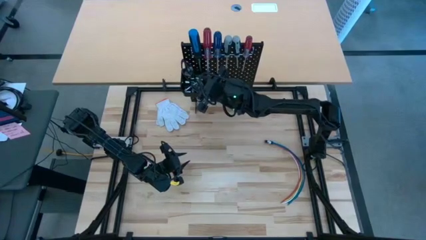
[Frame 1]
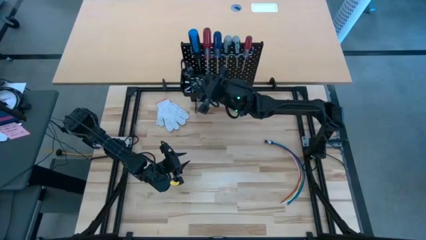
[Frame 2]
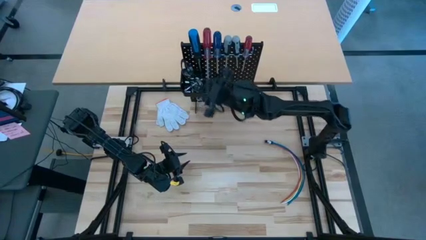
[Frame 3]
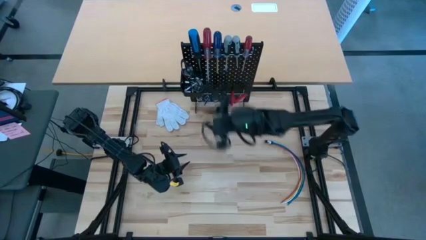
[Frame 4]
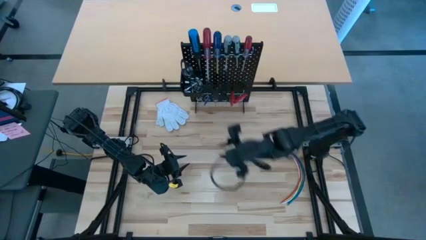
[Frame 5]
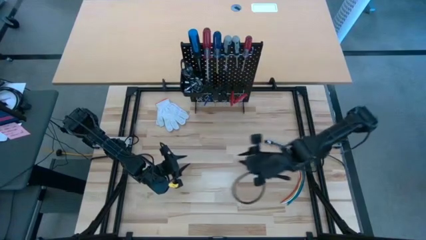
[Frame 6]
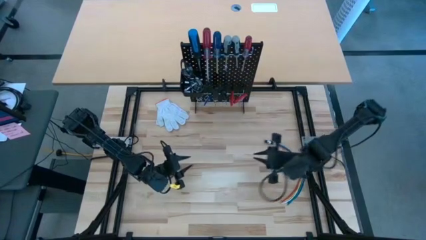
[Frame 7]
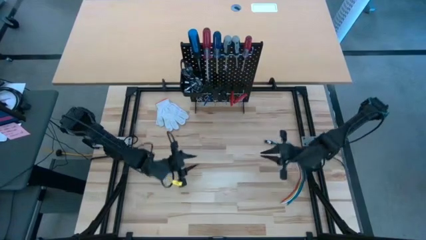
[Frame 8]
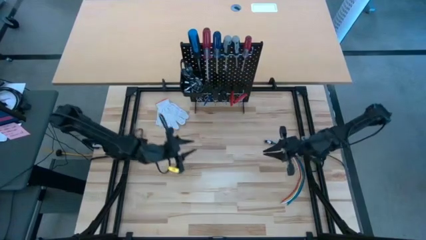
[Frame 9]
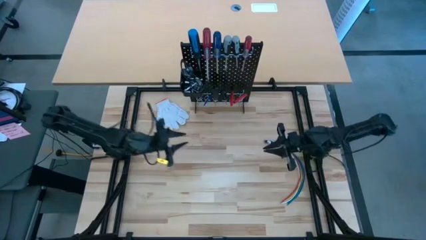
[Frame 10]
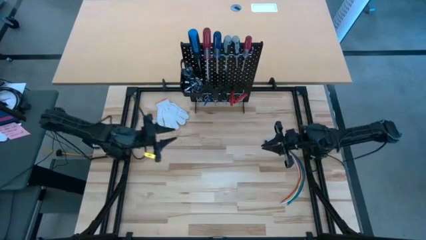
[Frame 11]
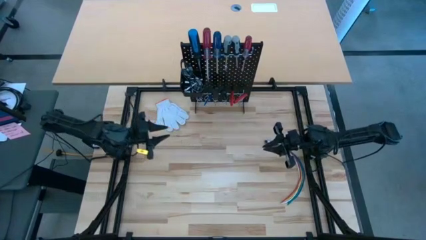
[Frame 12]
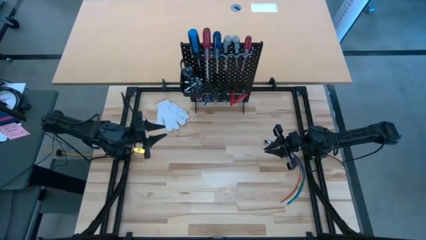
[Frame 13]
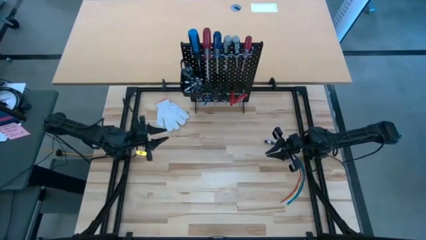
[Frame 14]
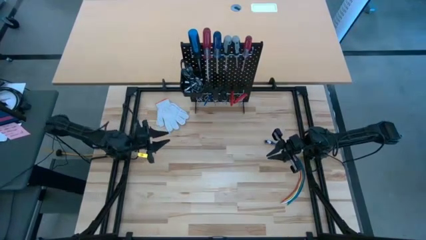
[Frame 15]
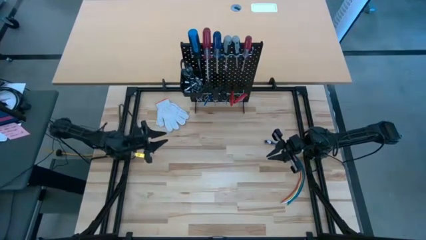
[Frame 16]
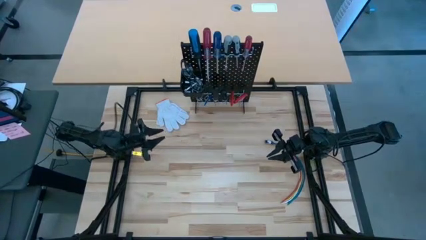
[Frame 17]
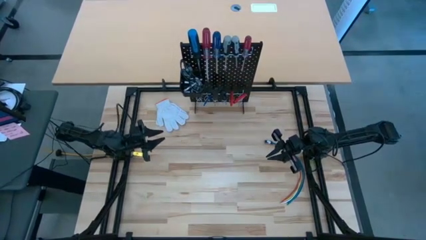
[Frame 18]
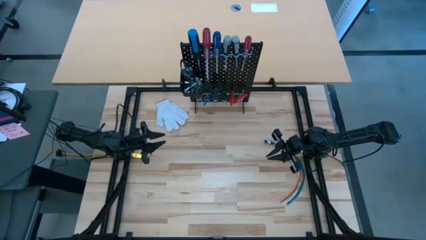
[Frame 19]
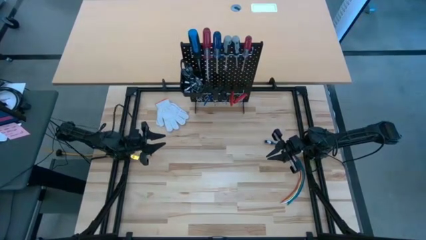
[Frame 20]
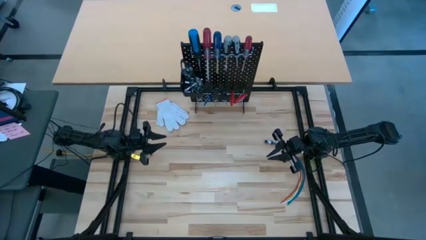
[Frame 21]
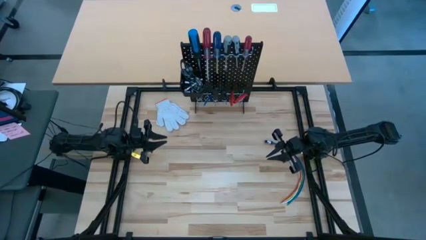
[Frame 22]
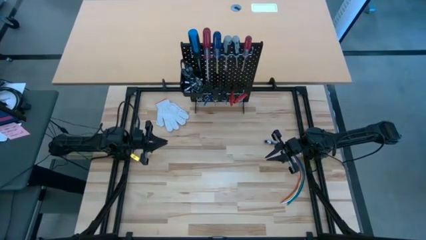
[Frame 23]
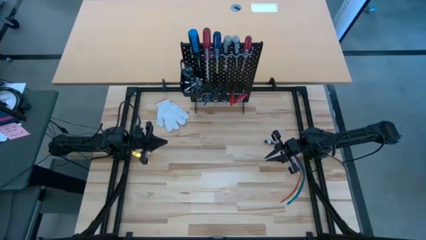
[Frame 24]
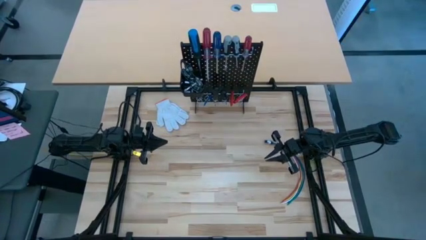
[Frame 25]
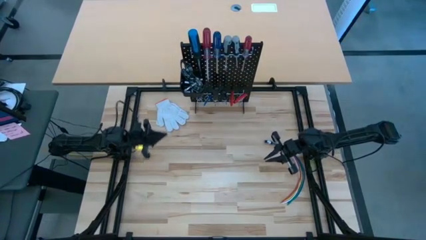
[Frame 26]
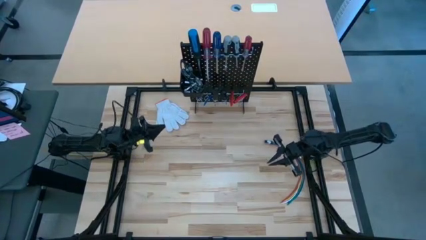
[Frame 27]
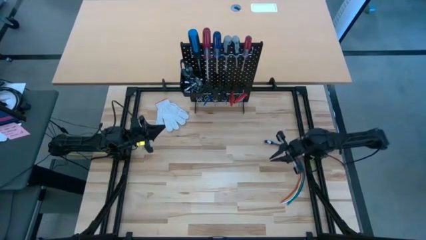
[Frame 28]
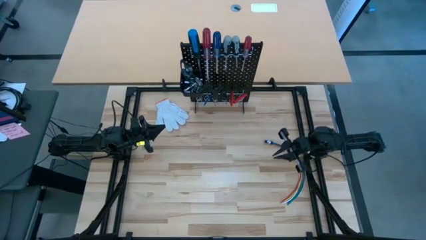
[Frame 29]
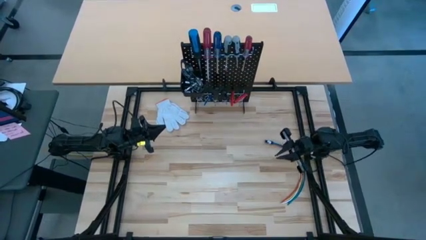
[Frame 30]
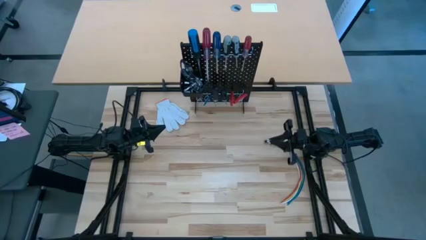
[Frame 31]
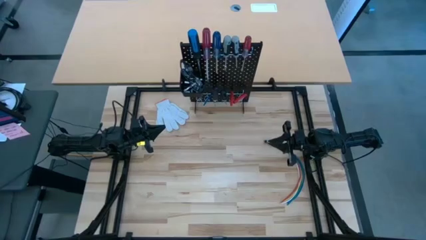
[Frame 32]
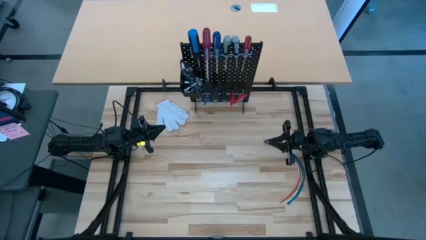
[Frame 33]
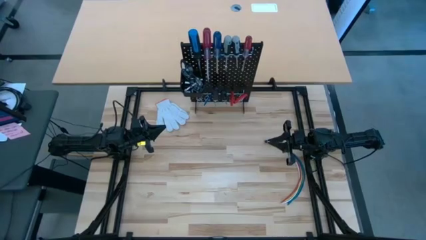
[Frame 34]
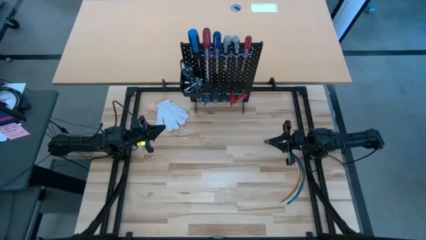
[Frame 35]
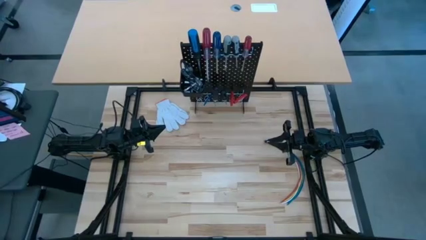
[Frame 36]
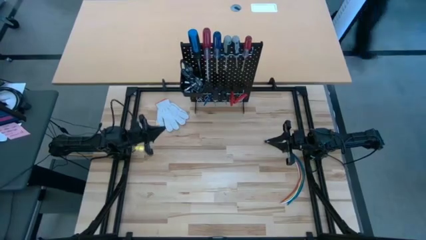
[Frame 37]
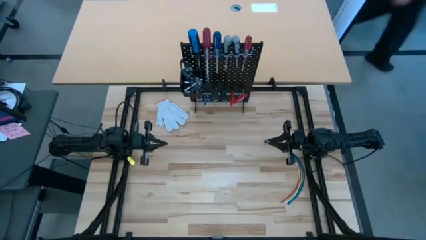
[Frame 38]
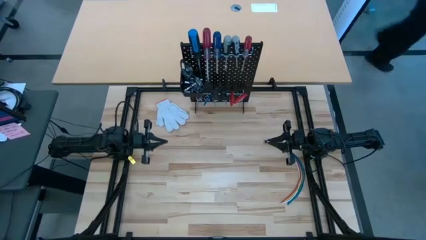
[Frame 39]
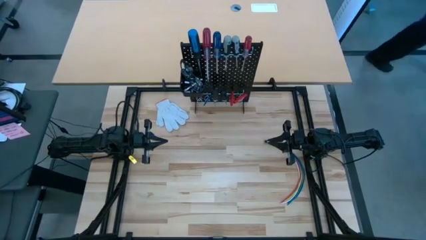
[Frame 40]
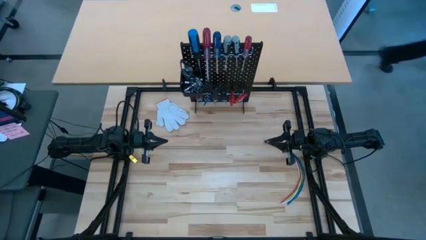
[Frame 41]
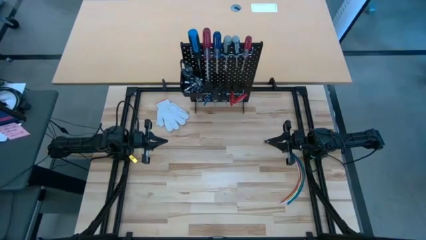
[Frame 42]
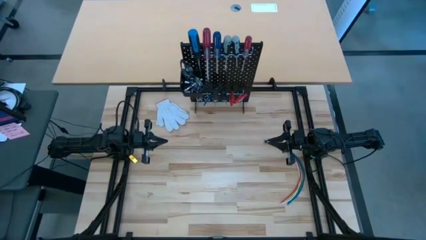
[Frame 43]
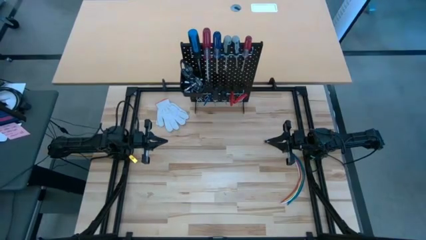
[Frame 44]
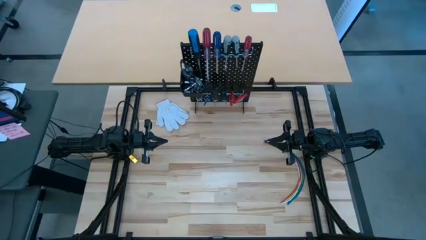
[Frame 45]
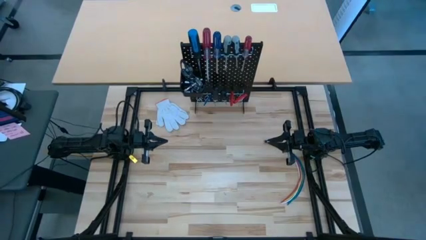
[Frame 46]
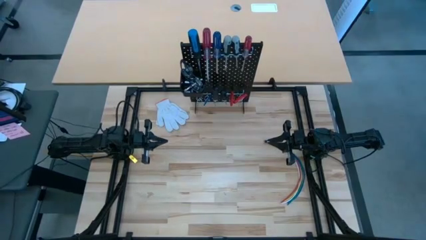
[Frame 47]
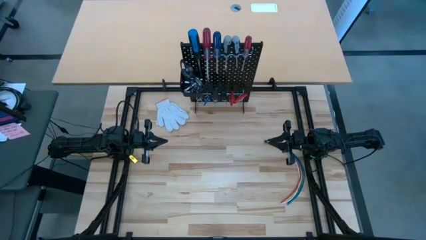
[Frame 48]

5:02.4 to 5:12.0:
Task: Hang tools onto peg board
Return to Home Position

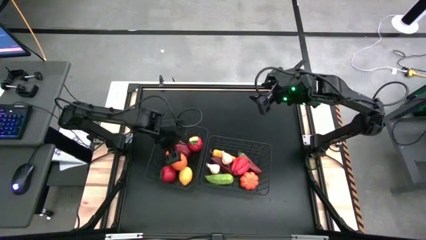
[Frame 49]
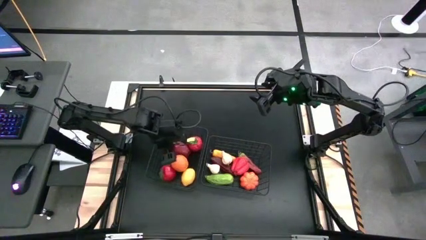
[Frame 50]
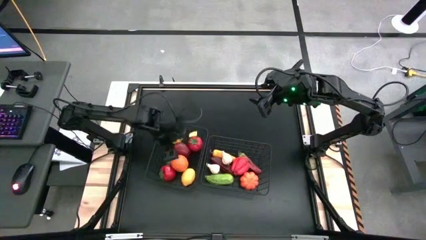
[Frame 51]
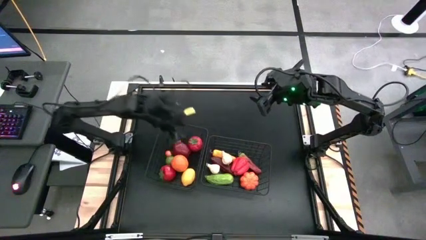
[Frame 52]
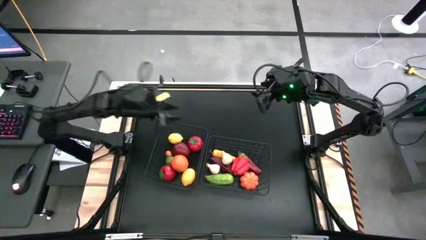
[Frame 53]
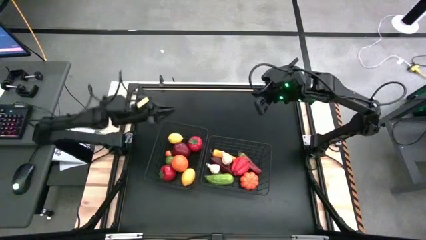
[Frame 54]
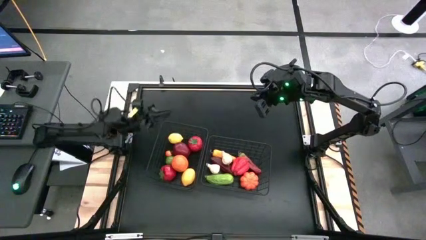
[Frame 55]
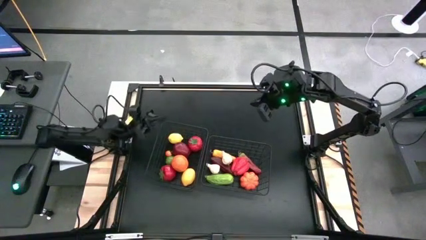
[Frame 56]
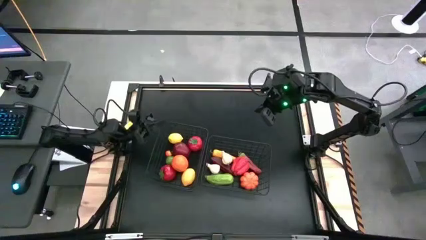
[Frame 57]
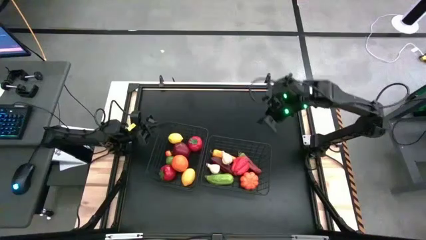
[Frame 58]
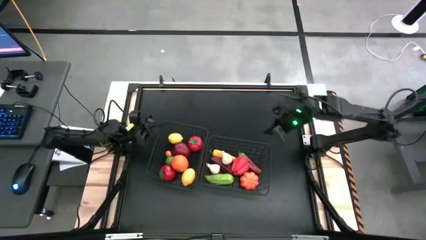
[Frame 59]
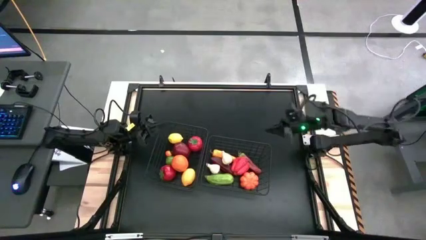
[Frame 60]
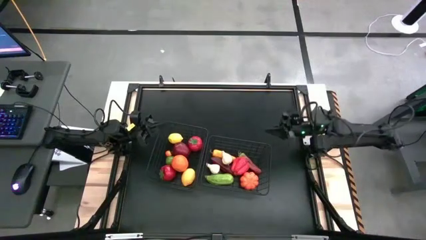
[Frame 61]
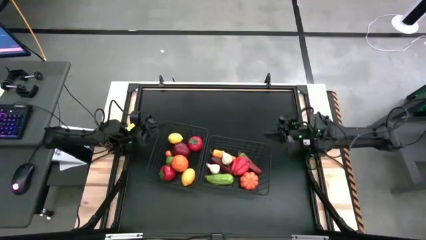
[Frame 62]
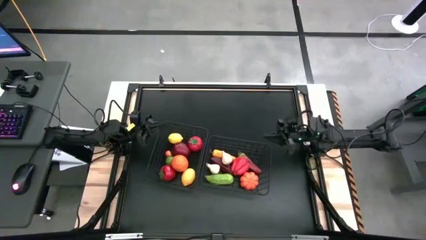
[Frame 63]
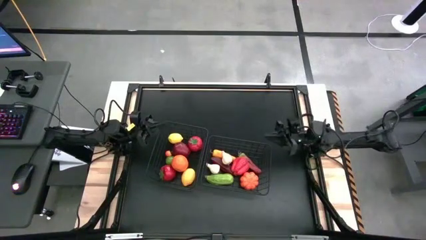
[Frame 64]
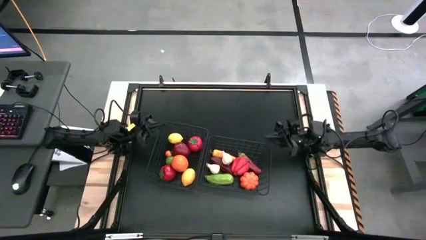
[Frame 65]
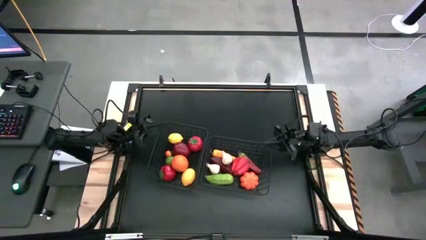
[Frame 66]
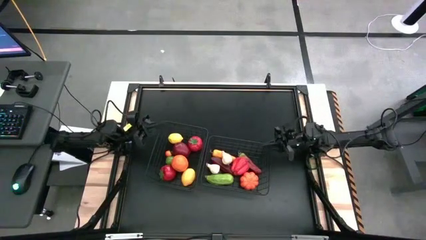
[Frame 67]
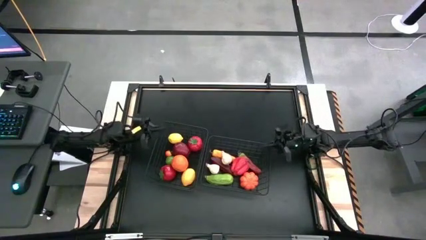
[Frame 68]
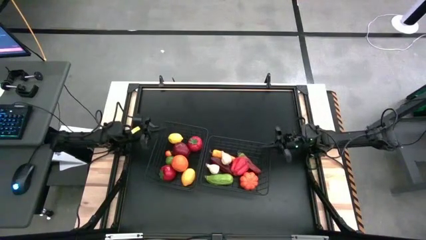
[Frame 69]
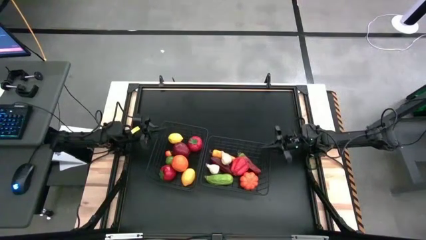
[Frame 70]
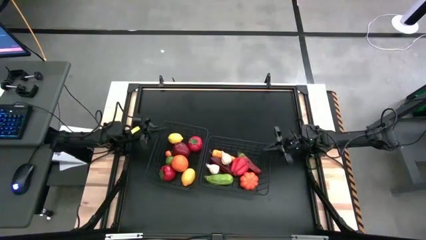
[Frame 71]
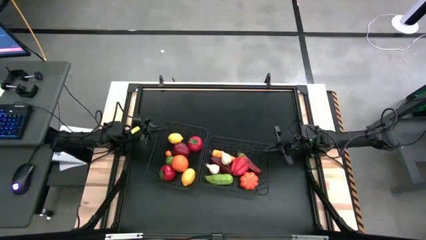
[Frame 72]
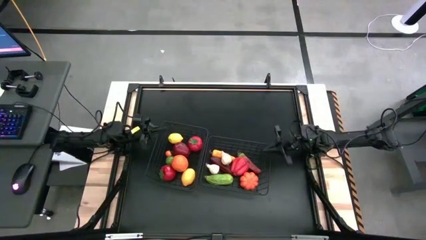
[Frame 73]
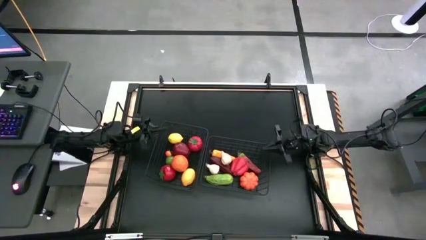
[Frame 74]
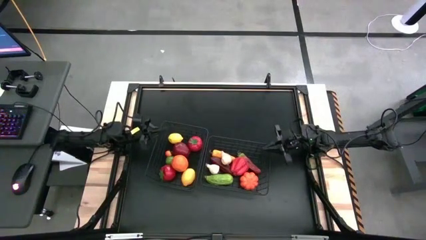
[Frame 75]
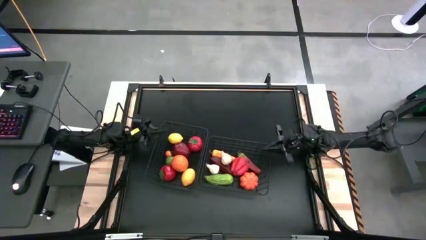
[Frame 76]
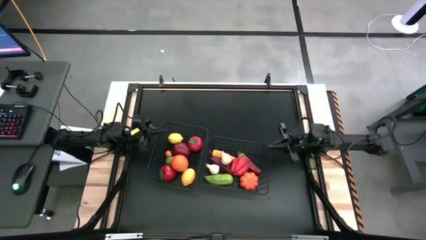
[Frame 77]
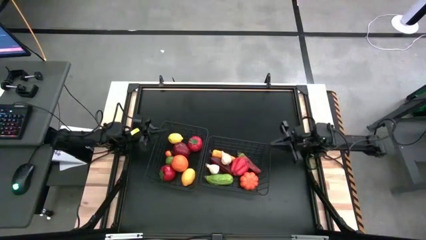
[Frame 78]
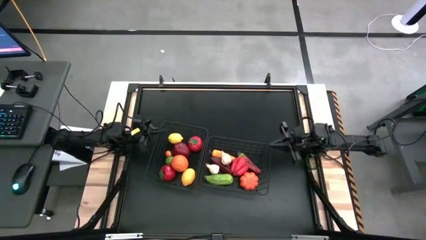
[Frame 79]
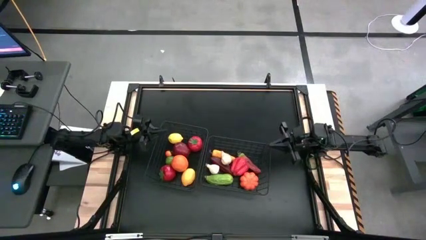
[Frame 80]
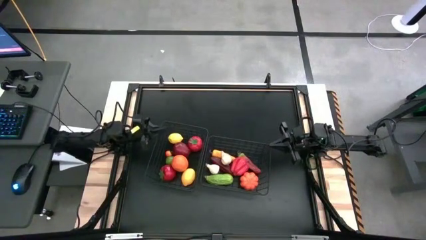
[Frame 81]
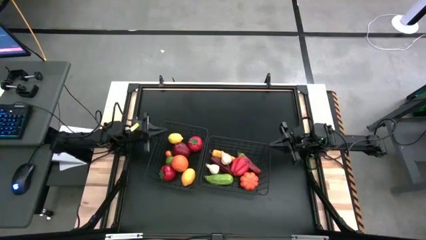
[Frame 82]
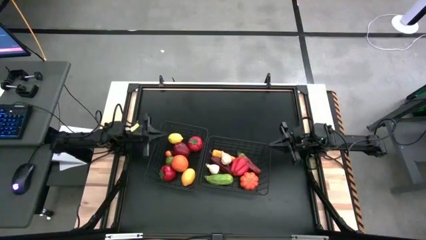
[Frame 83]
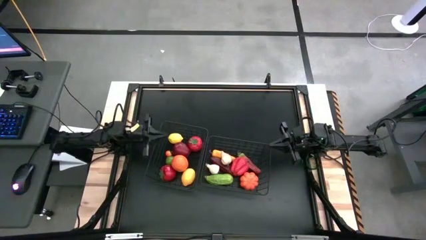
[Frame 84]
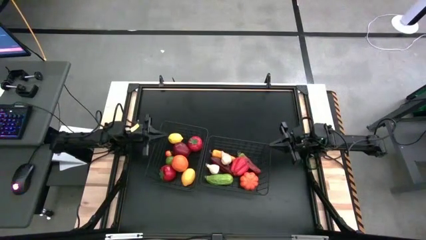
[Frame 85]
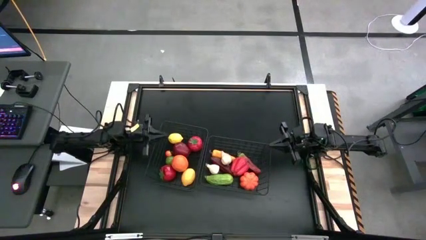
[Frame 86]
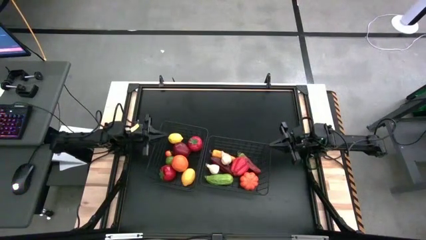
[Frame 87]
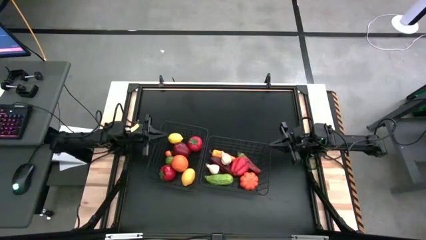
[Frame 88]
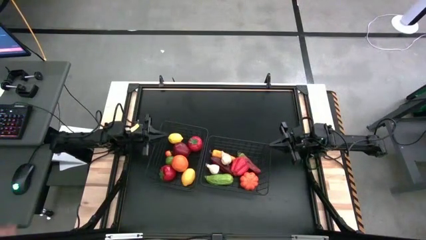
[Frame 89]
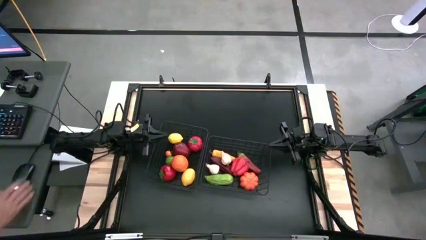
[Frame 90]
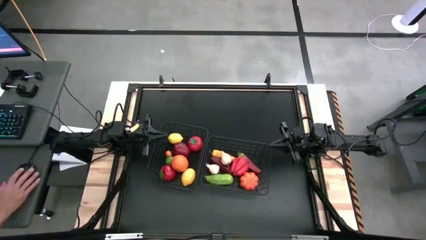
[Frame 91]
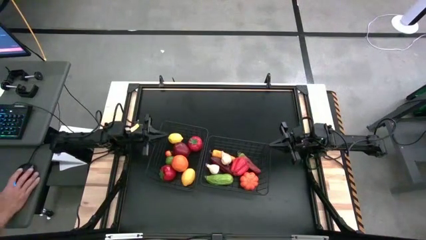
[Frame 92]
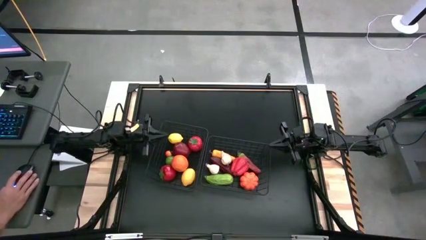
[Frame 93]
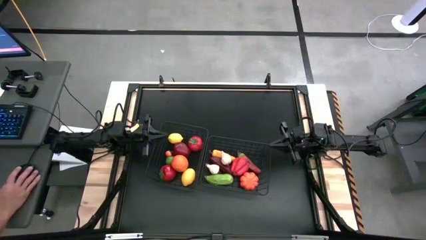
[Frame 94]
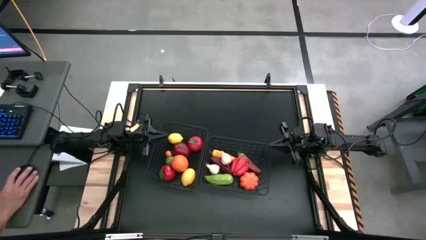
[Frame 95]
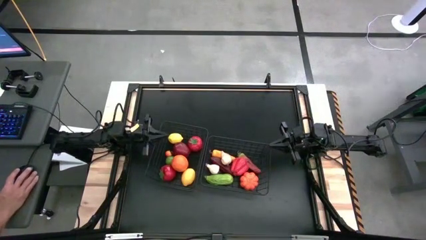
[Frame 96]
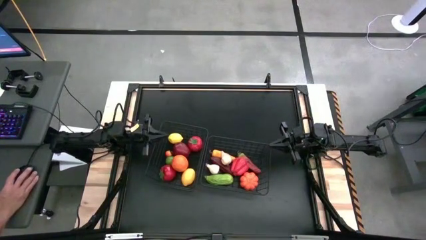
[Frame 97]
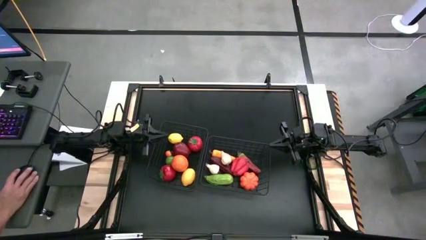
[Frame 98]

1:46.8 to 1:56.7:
Task: Sort produce into baskets
Return to Home Position
